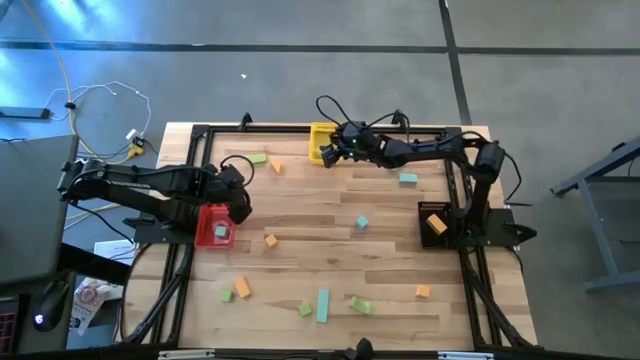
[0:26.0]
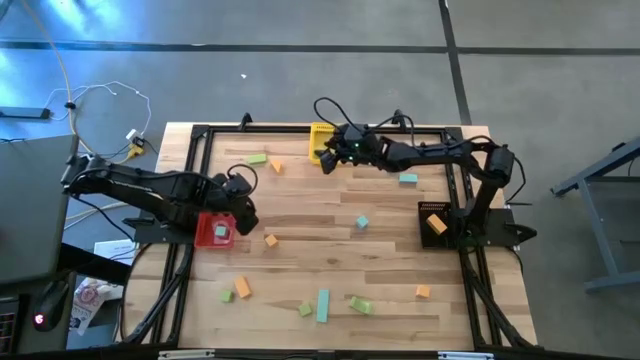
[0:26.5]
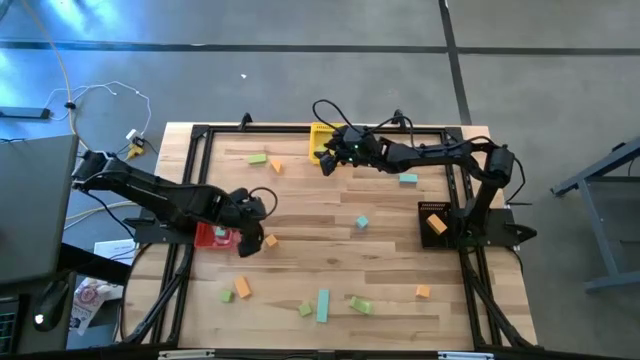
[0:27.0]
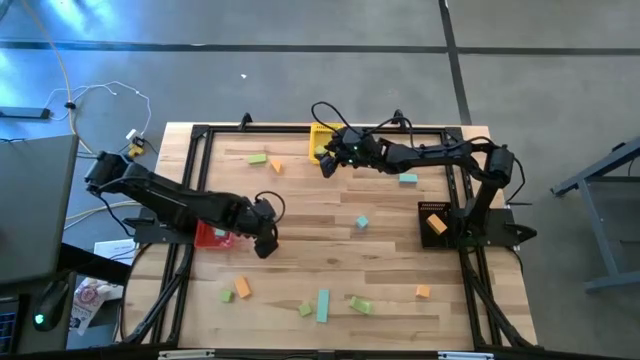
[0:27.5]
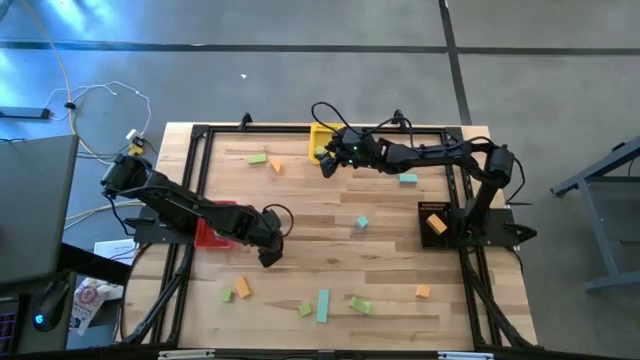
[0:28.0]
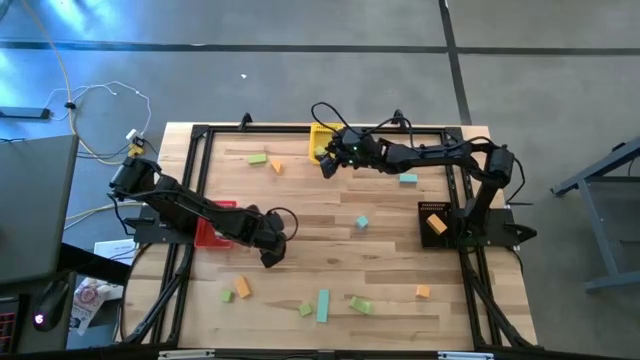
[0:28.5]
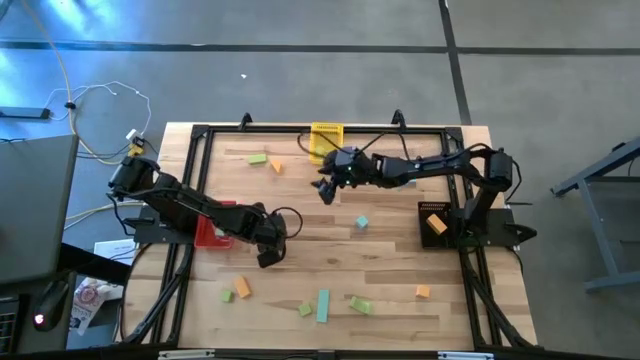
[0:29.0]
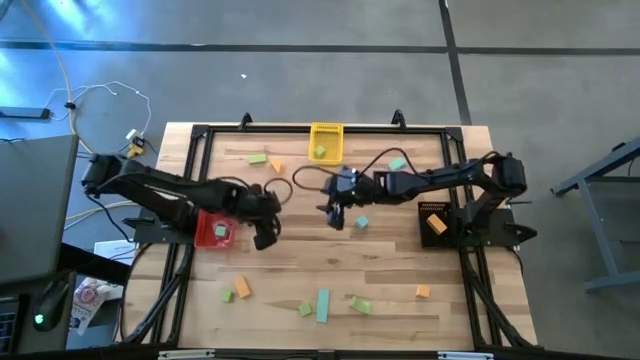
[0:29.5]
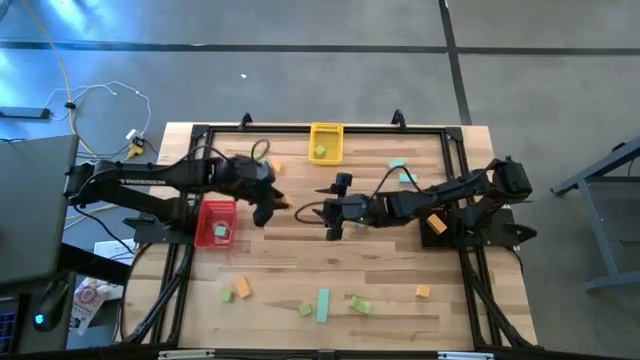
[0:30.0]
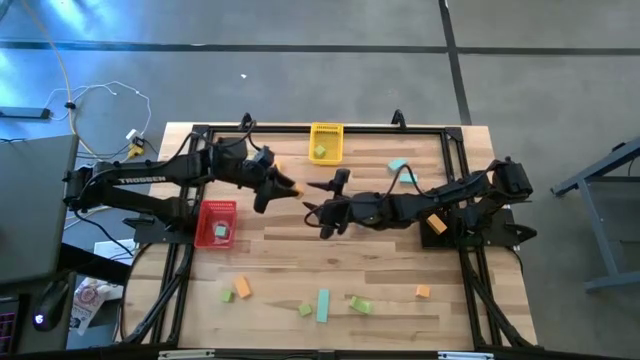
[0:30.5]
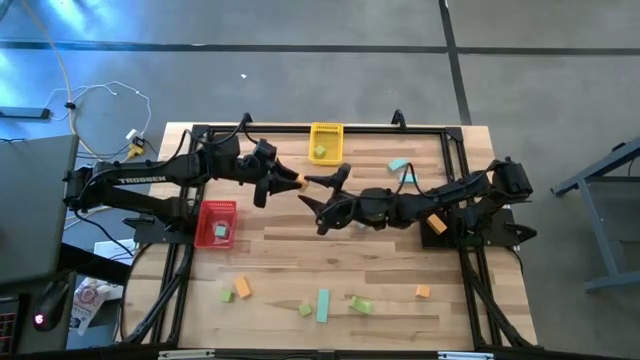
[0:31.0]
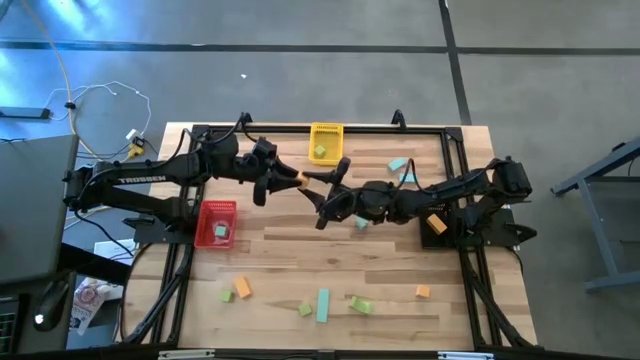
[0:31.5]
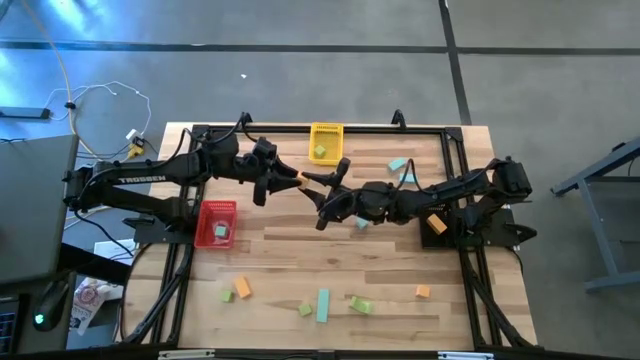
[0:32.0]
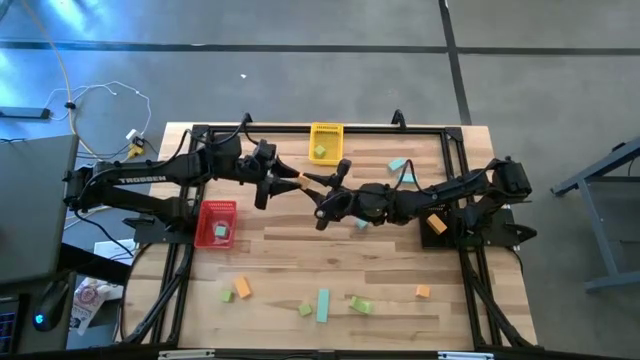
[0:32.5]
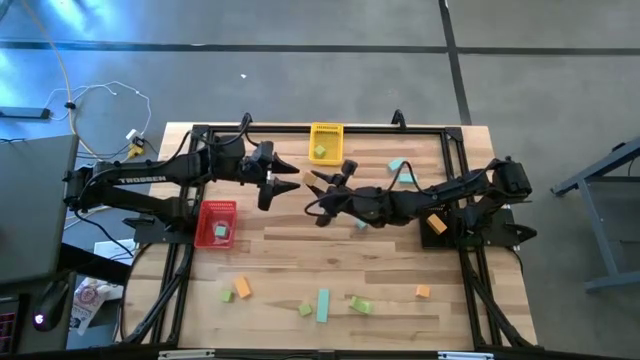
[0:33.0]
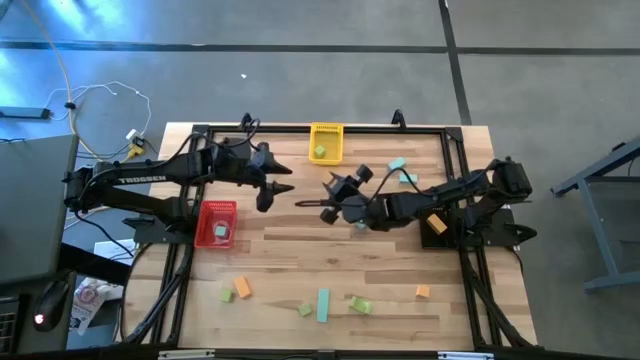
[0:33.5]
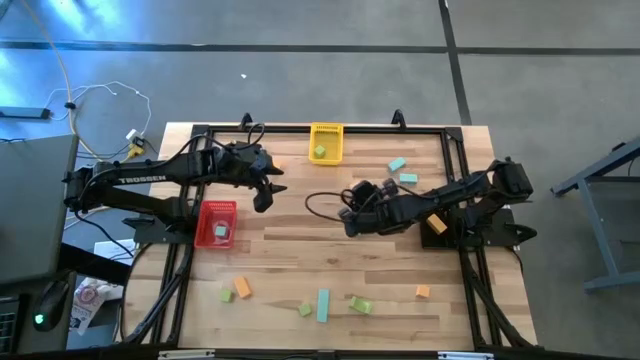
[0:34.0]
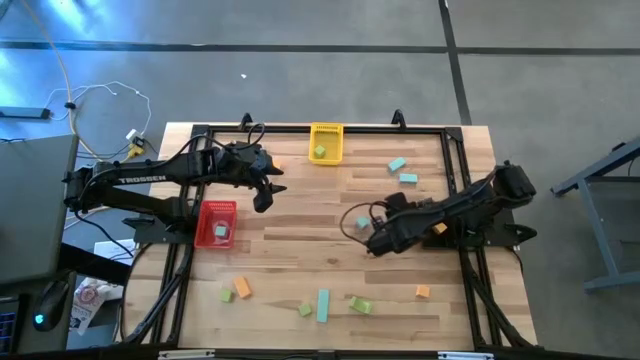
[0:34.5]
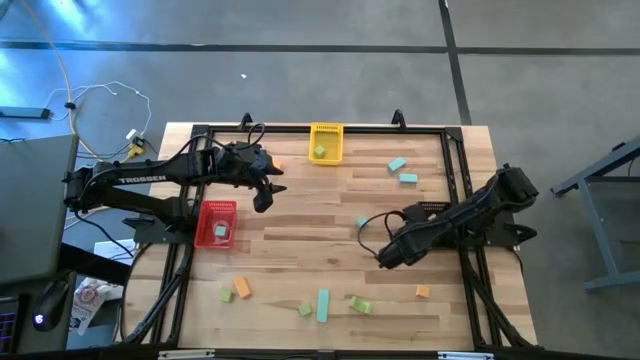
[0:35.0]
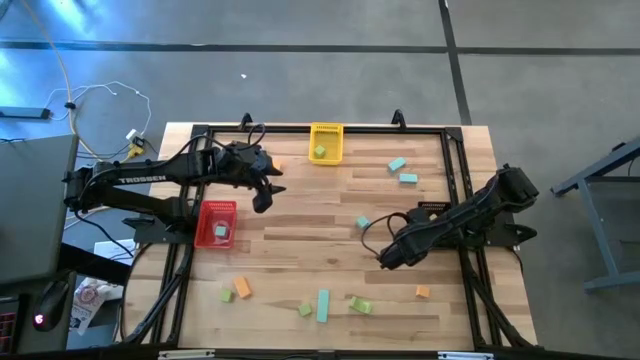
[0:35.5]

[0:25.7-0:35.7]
Task: Sort & place blocks by color
Put the orange block into the black bin

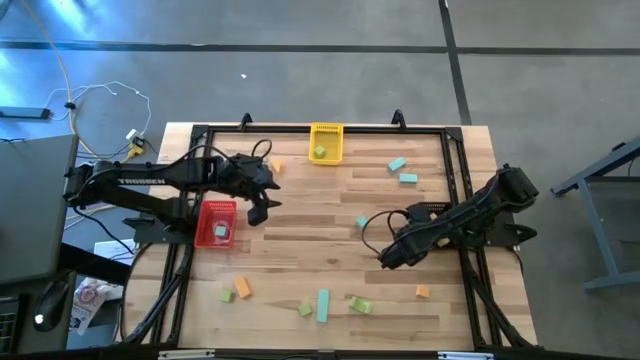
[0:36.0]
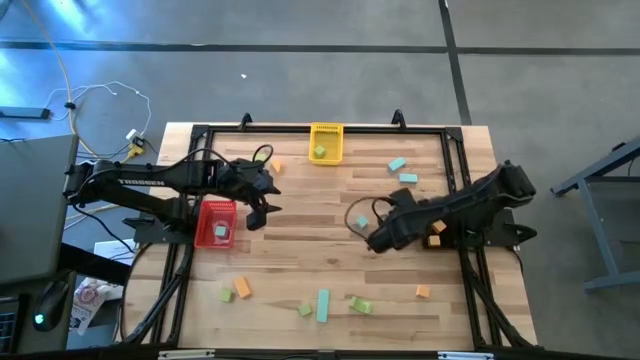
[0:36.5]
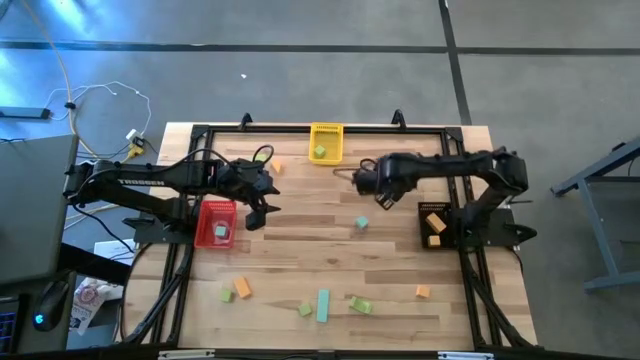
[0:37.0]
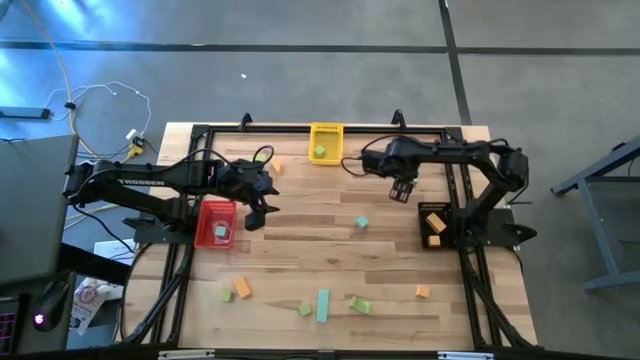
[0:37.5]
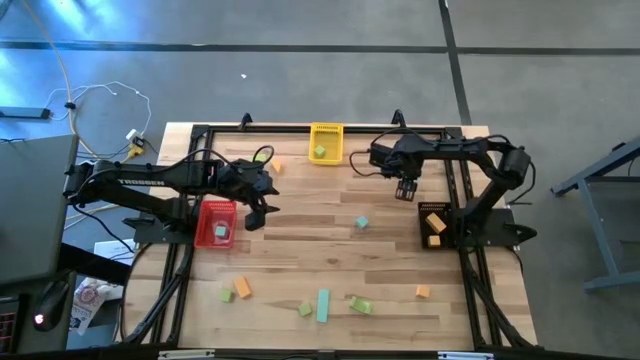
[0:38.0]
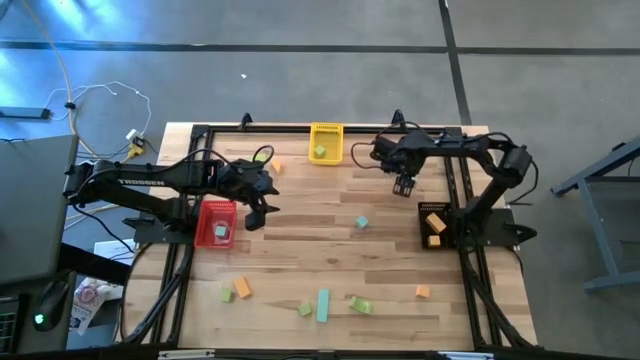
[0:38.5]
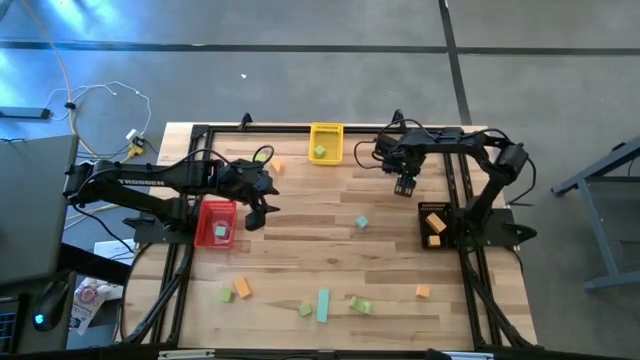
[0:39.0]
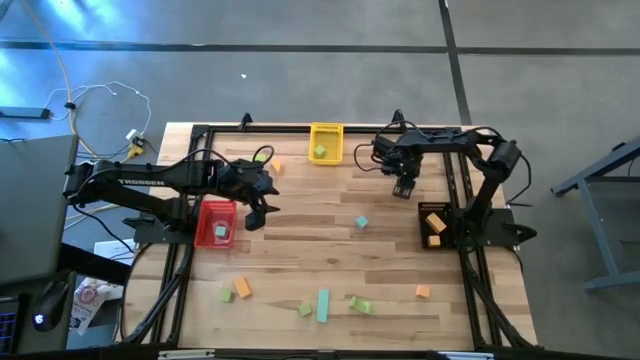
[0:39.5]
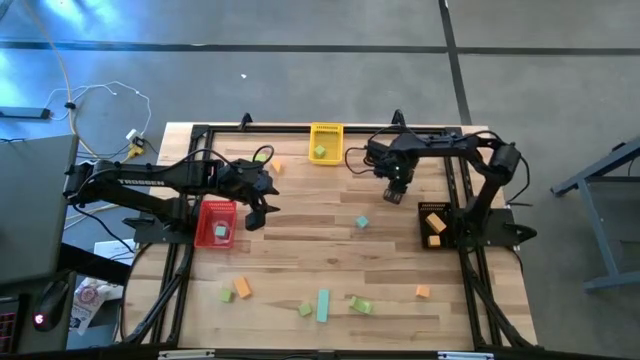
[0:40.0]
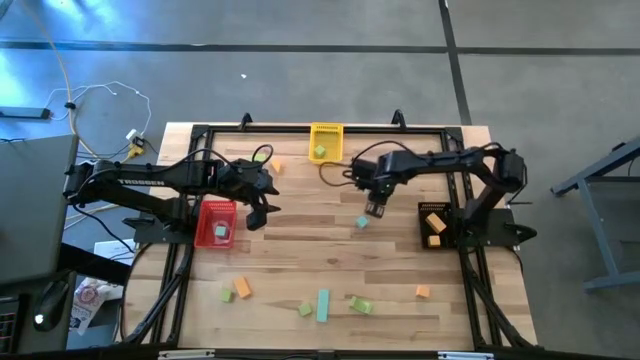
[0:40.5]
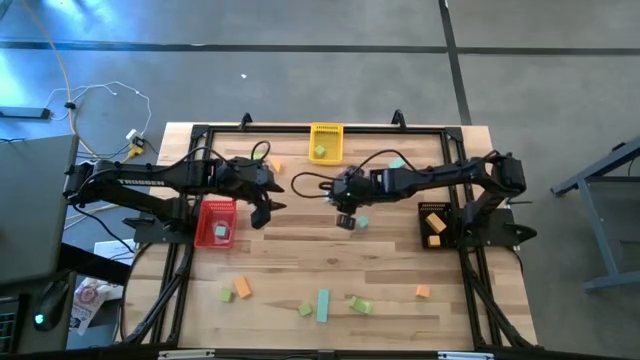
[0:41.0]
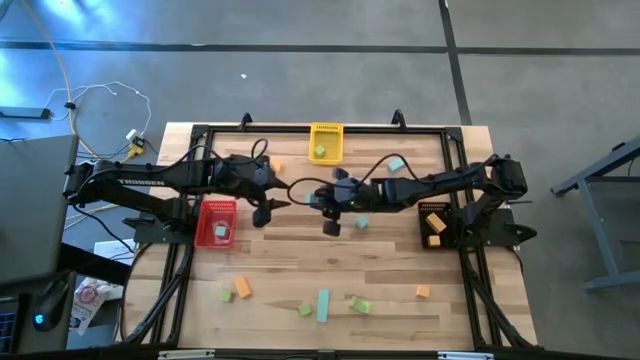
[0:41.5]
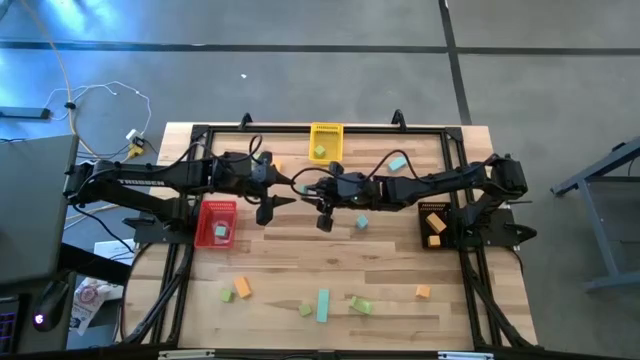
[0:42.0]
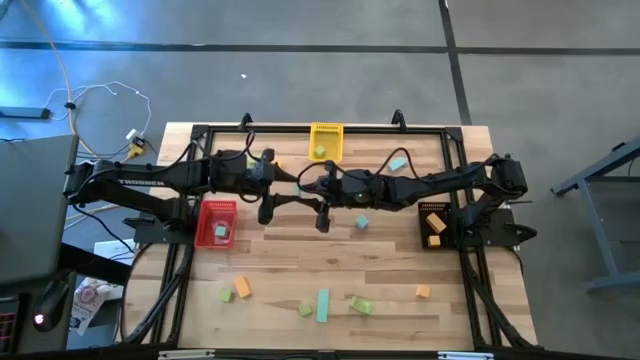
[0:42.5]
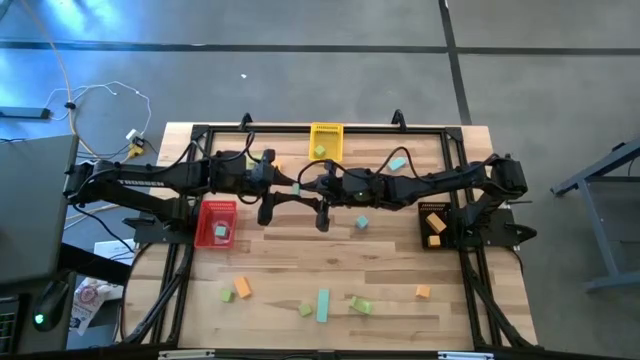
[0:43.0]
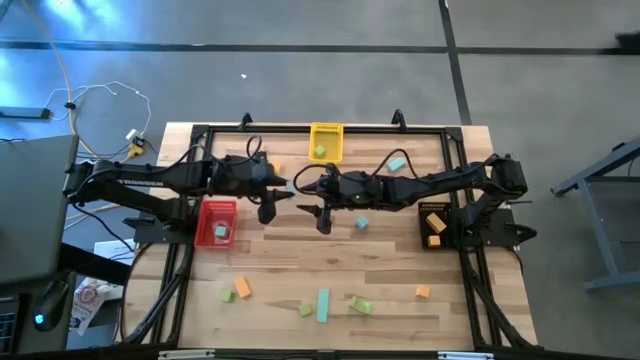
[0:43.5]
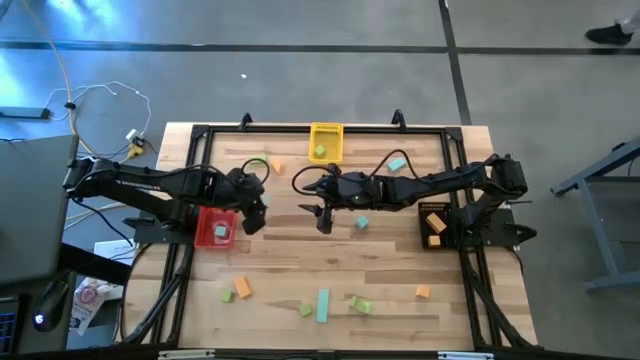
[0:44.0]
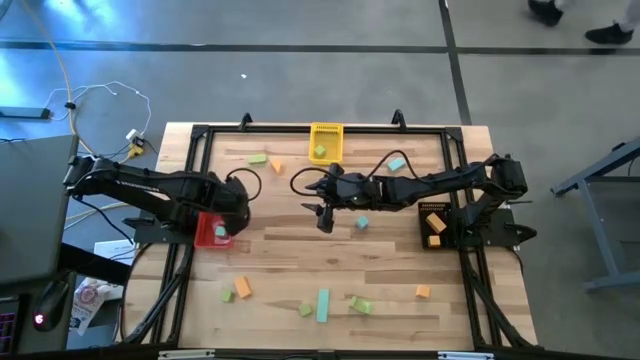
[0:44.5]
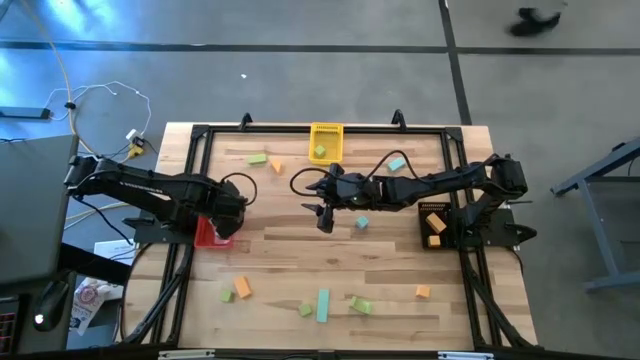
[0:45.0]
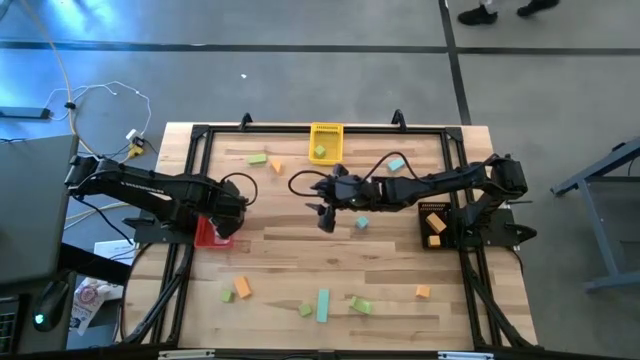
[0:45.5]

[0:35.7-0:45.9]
Put the blue block into the red bin

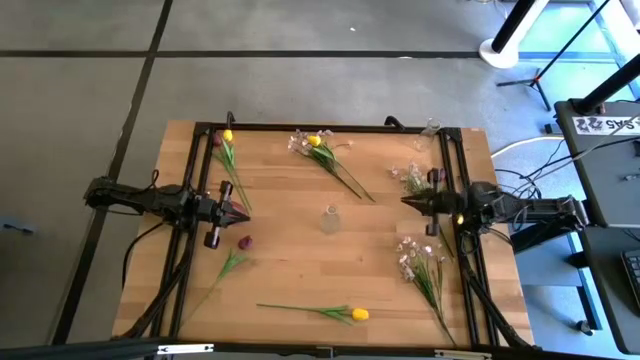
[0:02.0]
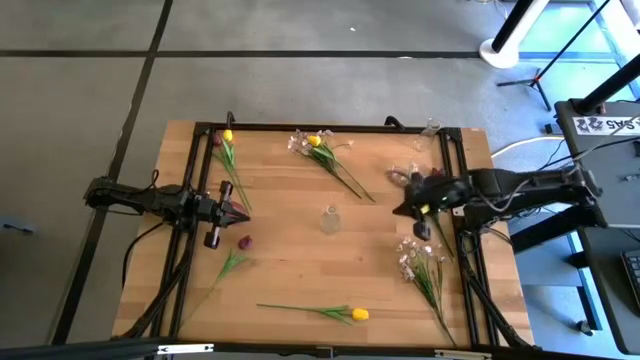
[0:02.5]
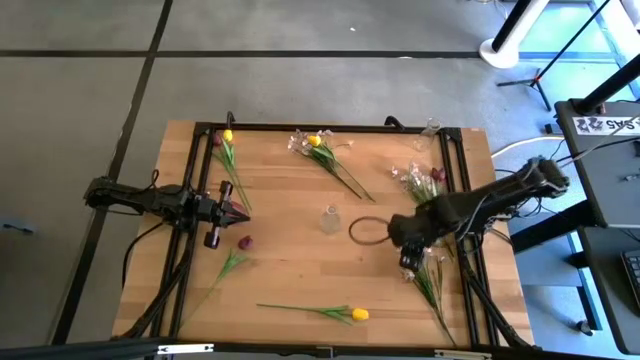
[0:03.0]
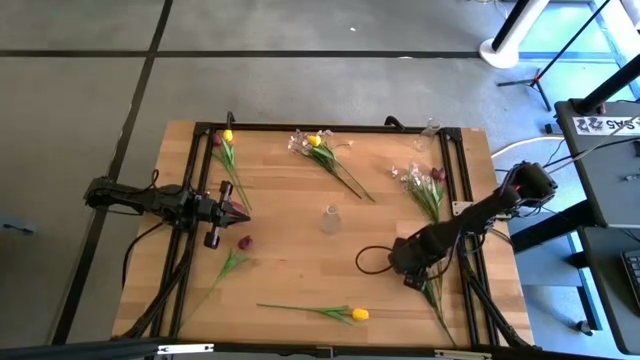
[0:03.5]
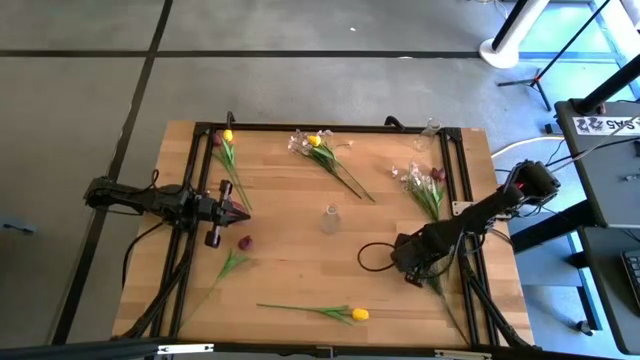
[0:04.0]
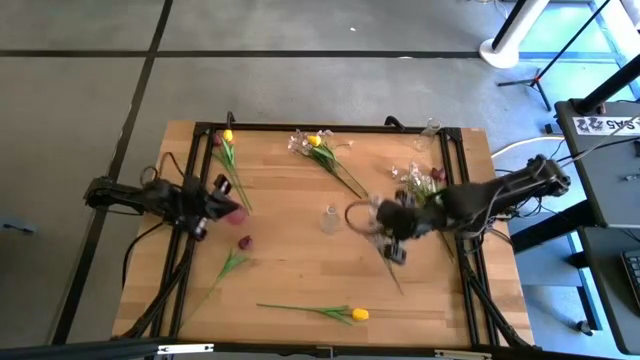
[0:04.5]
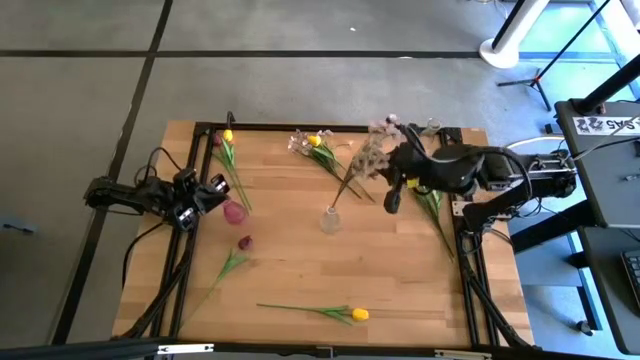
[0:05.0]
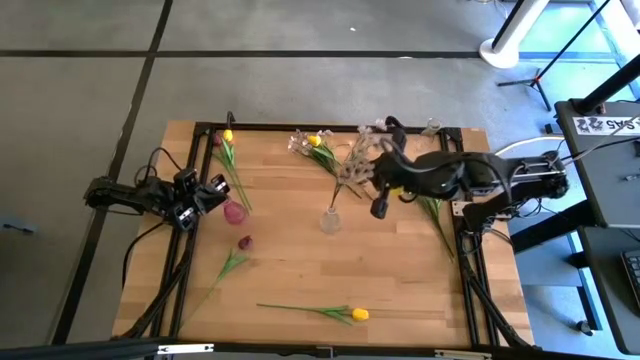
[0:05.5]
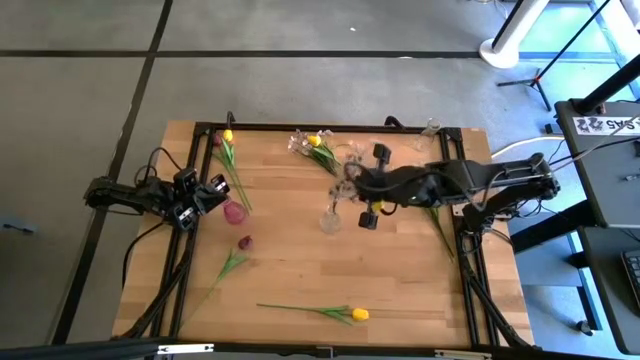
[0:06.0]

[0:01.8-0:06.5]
Task: Sort flowers into vase by color
Put the bottom right white flowers into the bottom transparent vase
